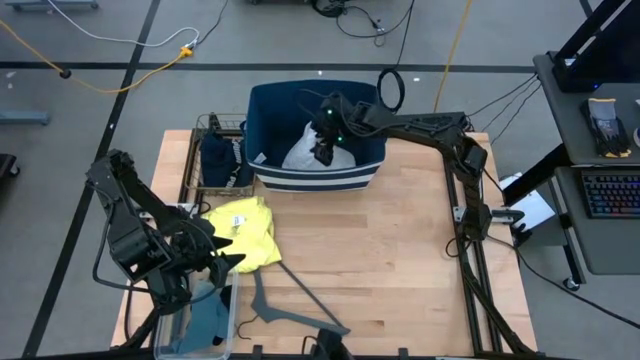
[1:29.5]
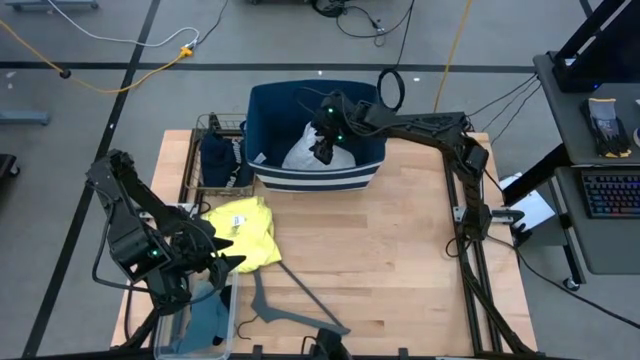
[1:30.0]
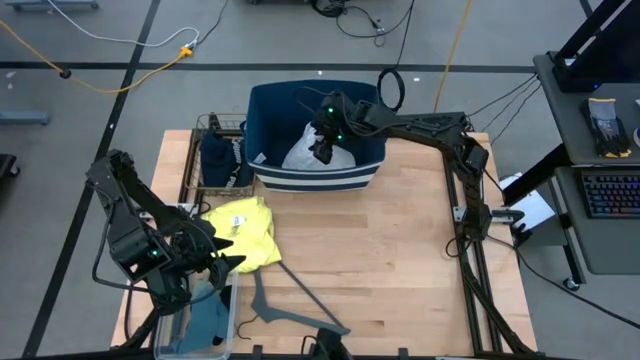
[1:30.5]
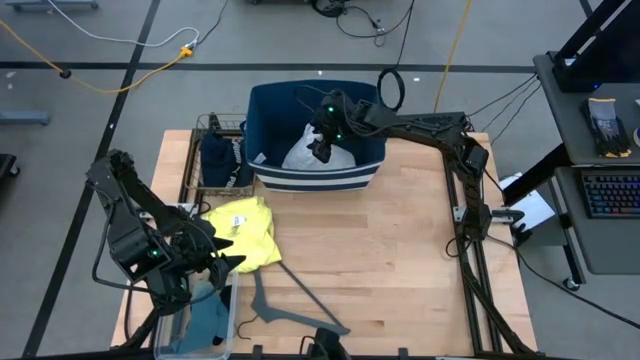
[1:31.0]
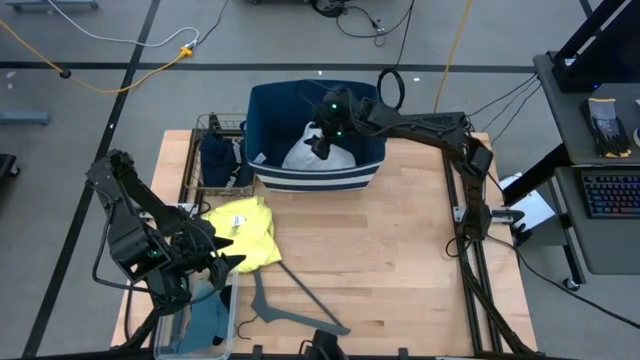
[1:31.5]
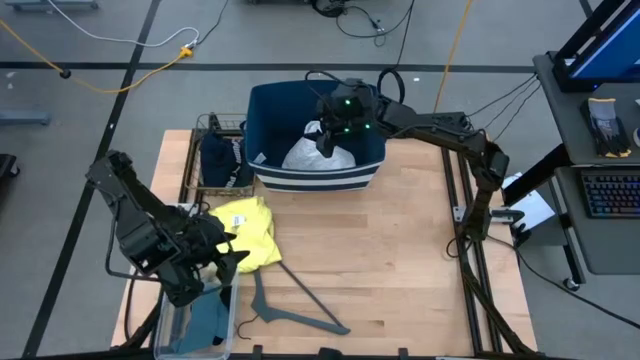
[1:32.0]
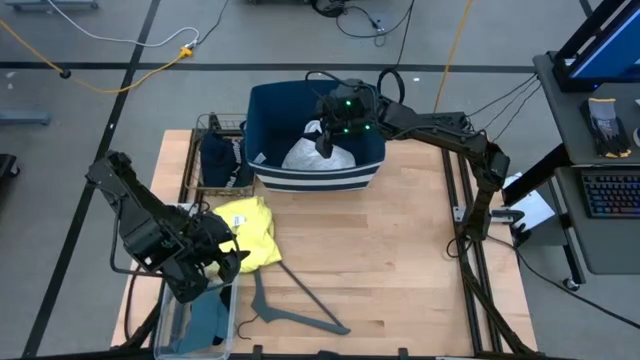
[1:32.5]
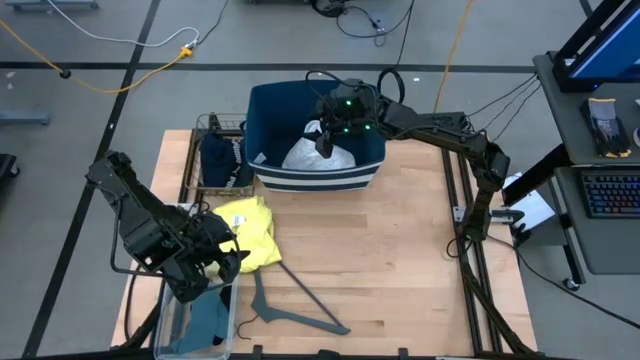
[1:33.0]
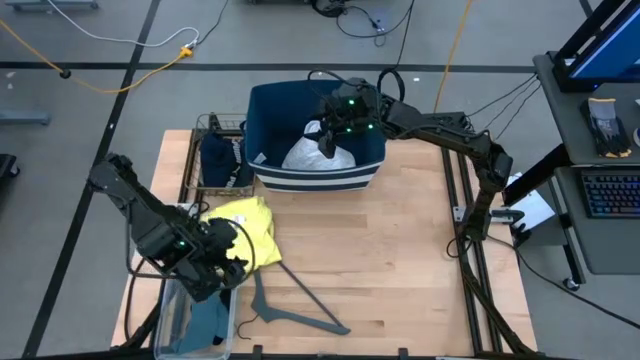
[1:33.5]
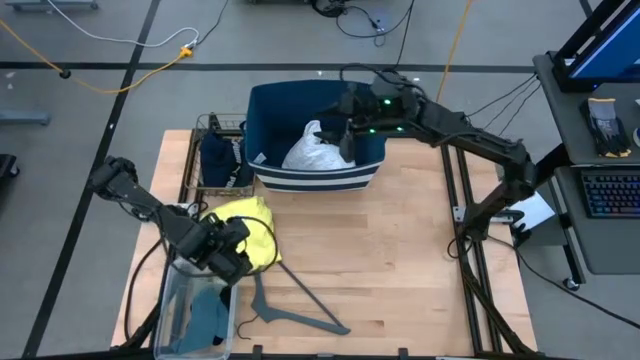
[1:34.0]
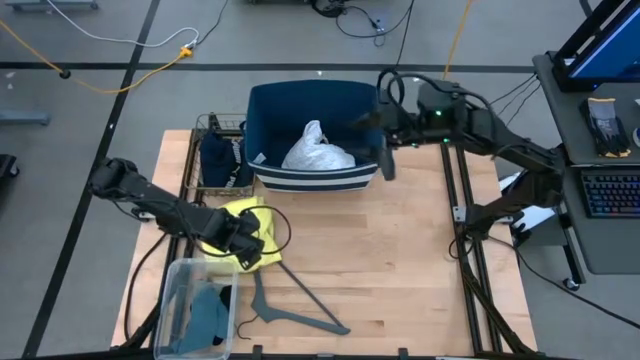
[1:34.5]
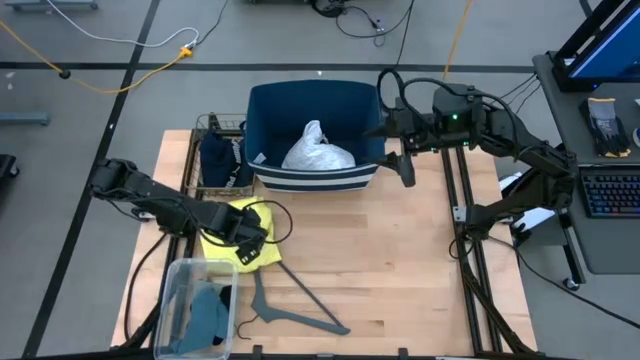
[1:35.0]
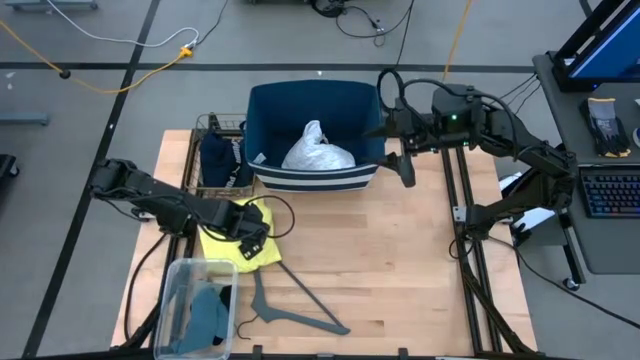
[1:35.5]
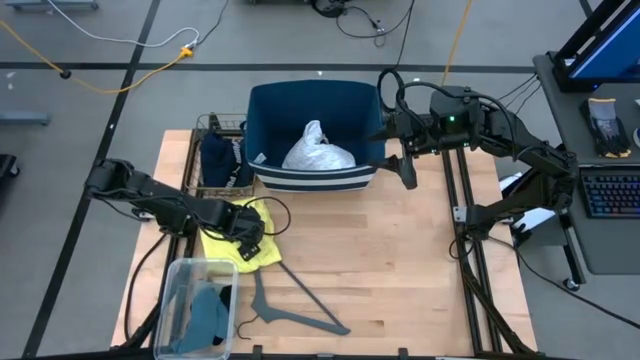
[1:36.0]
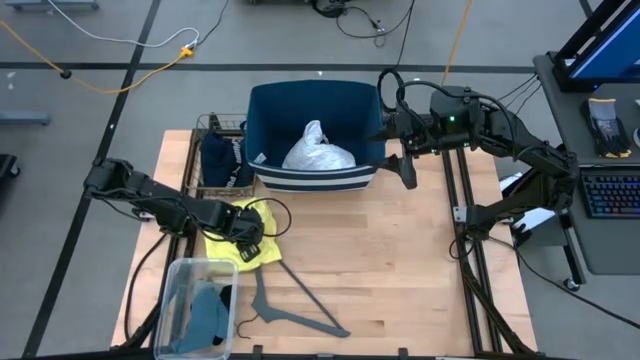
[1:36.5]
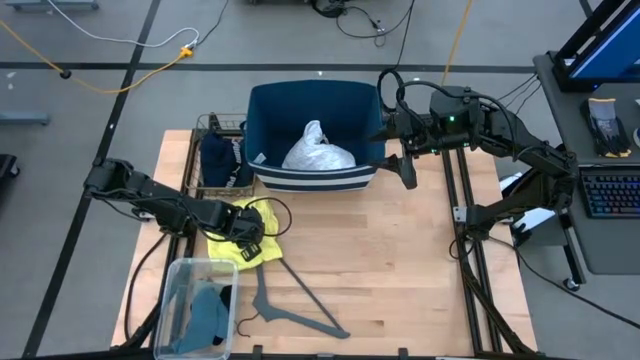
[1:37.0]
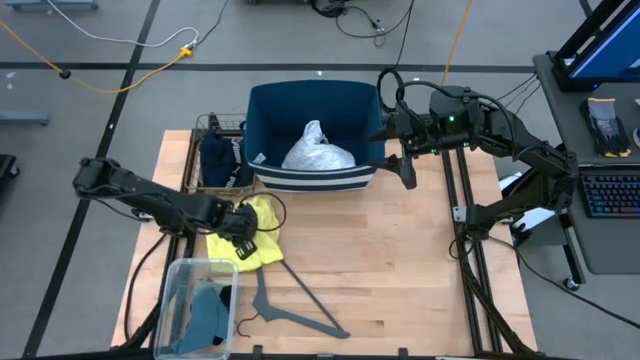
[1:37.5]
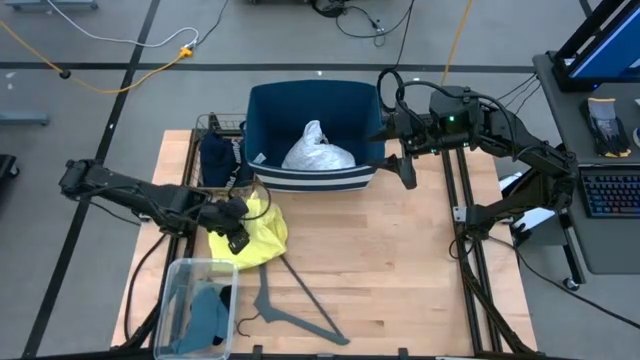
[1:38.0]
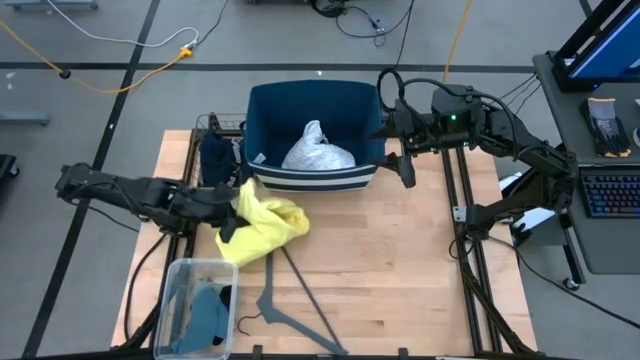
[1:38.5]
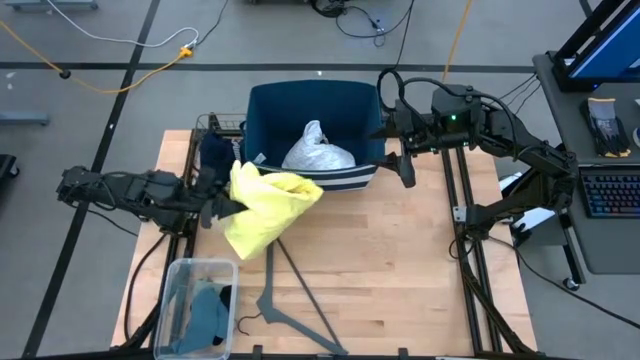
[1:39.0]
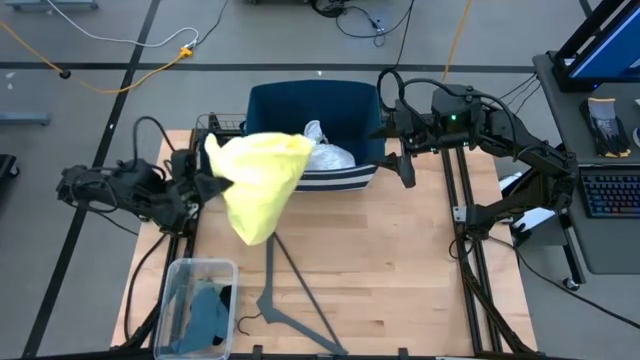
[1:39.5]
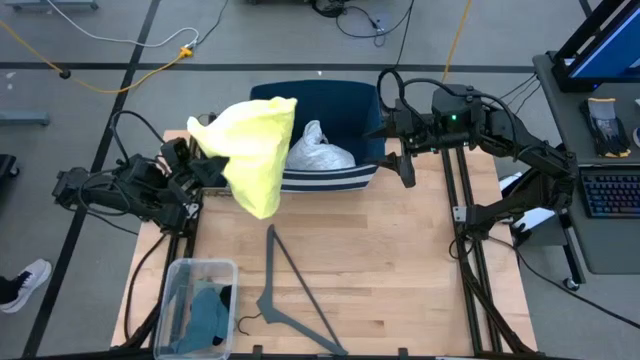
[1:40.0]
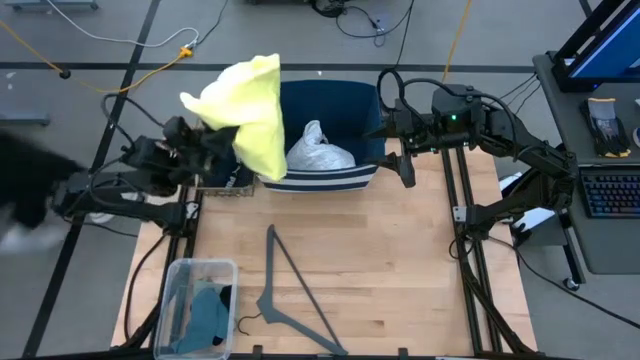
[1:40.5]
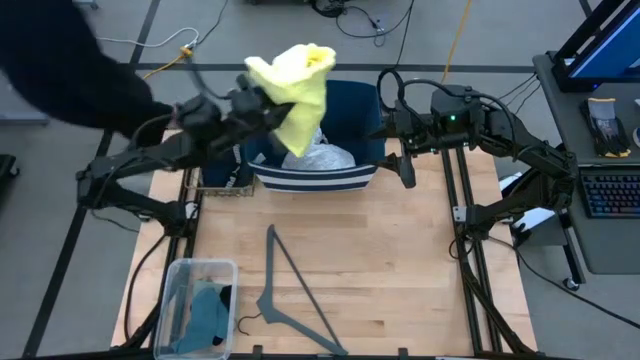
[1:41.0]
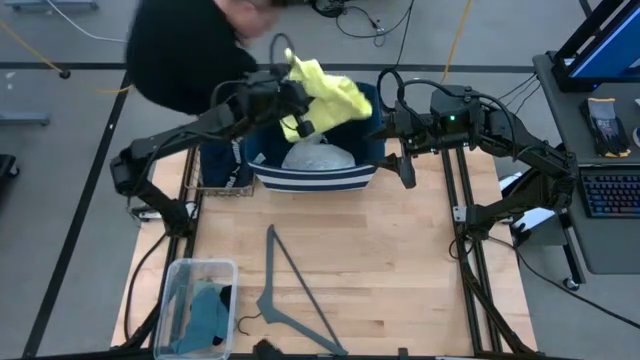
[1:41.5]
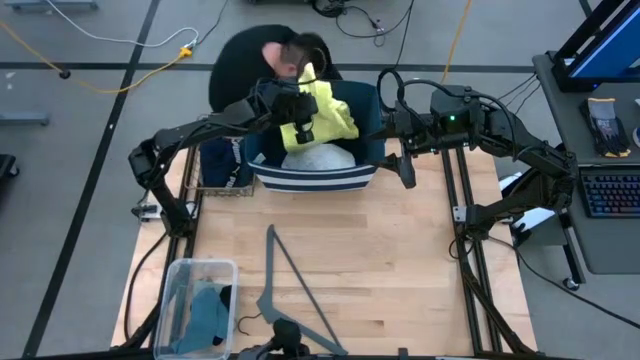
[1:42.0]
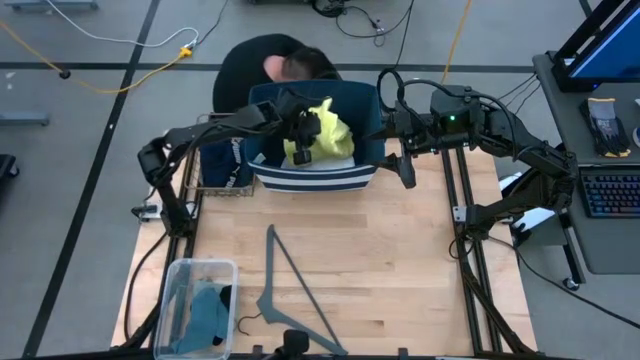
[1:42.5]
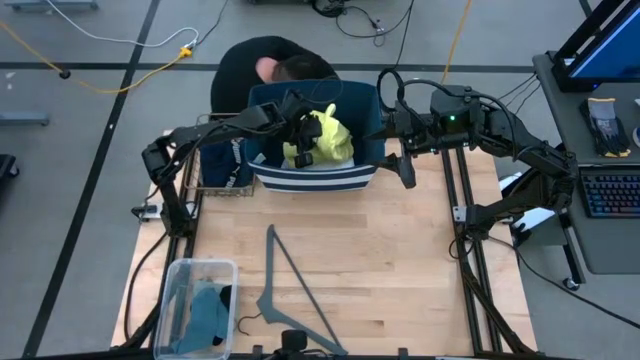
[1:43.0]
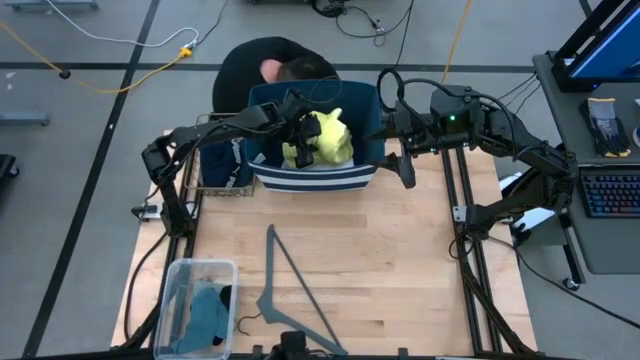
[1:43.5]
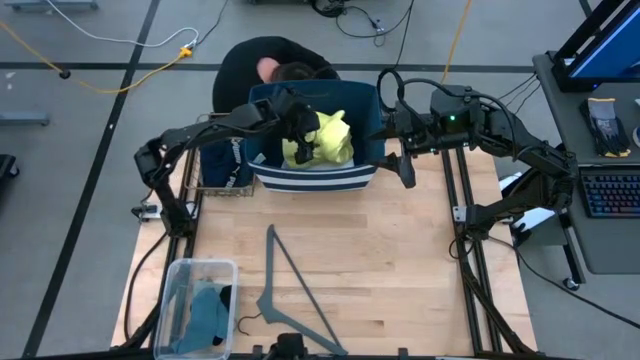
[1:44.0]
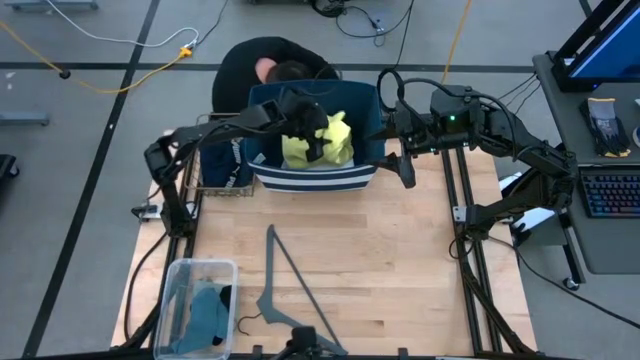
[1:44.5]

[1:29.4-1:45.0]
Task: Pick & Place Cloths
Put the yellow shirt into the blue laundry bin

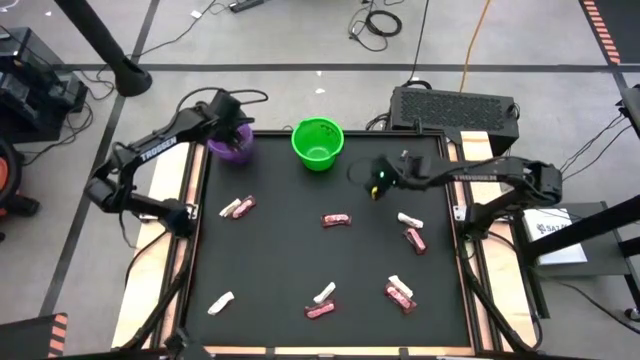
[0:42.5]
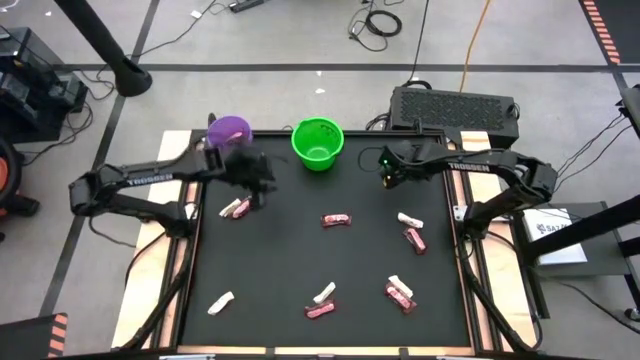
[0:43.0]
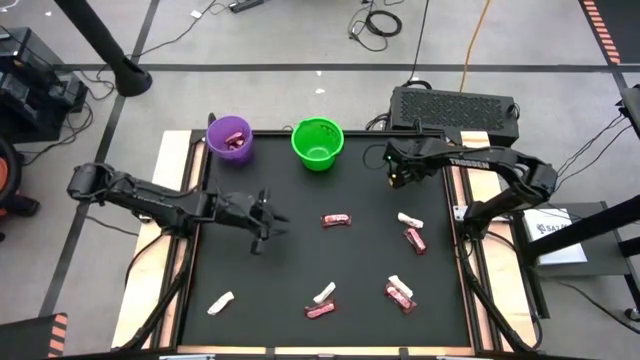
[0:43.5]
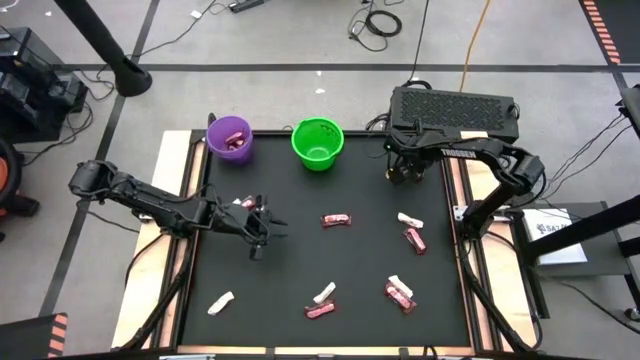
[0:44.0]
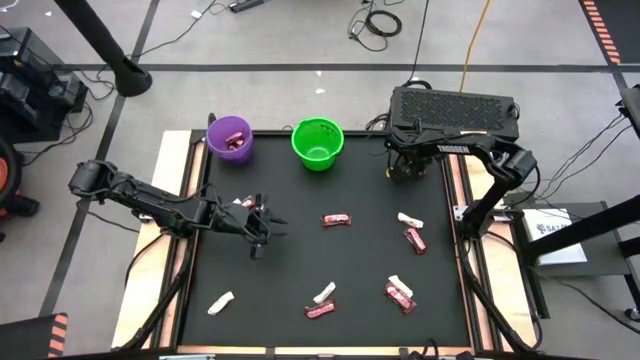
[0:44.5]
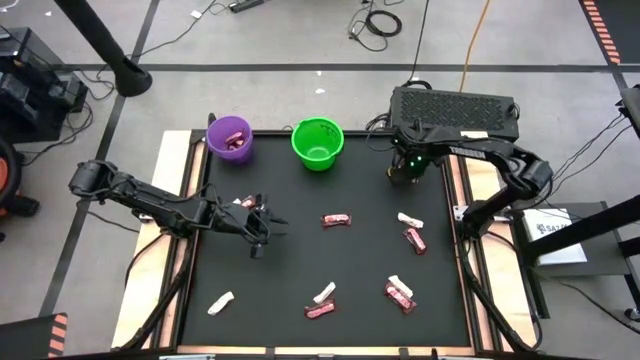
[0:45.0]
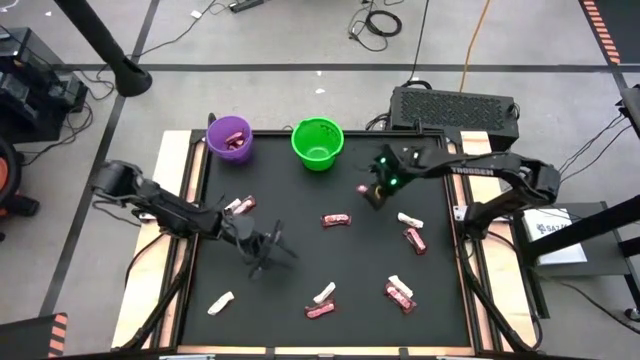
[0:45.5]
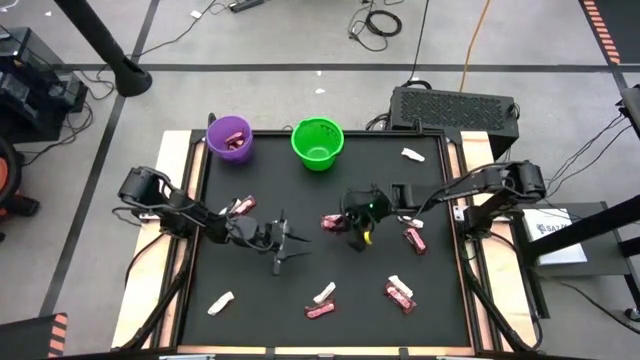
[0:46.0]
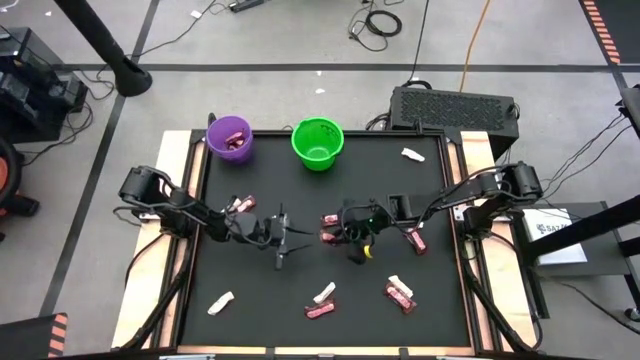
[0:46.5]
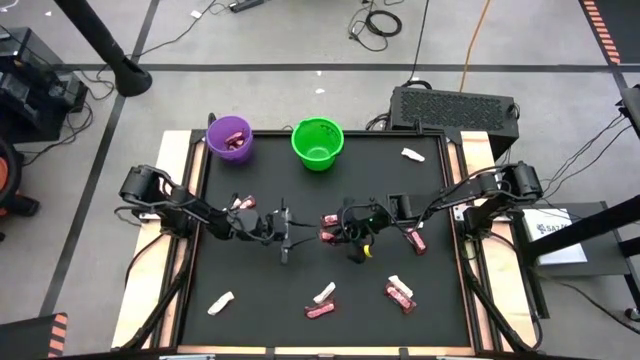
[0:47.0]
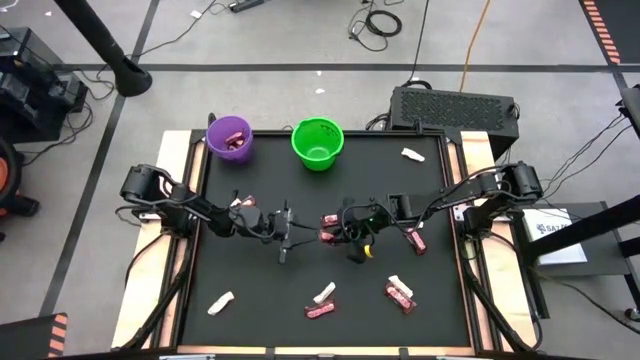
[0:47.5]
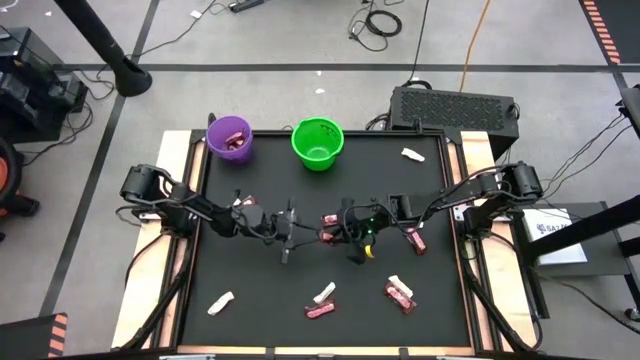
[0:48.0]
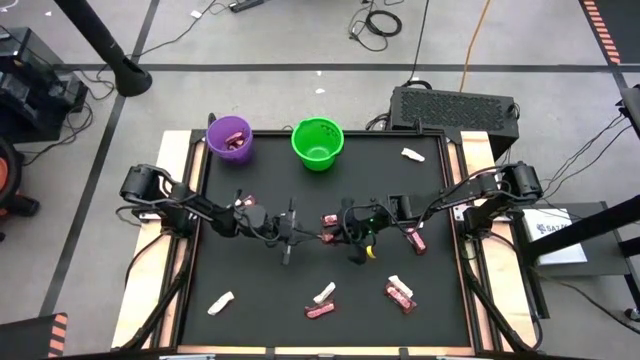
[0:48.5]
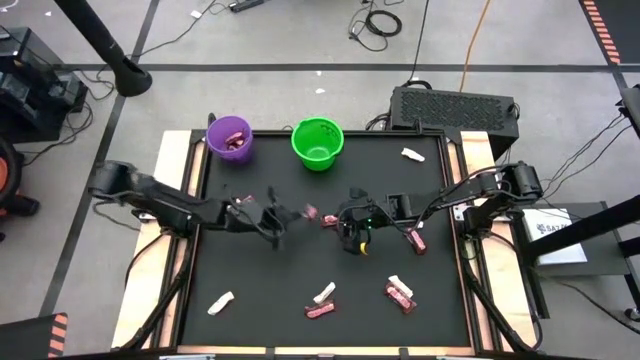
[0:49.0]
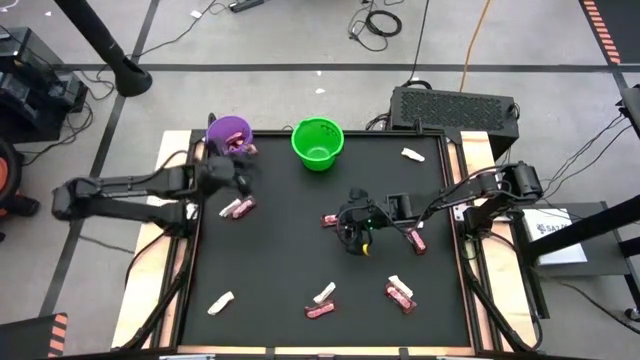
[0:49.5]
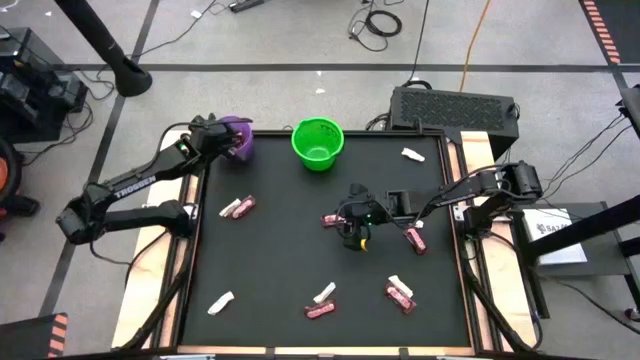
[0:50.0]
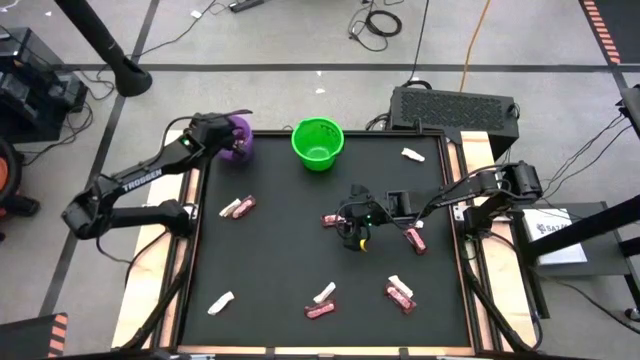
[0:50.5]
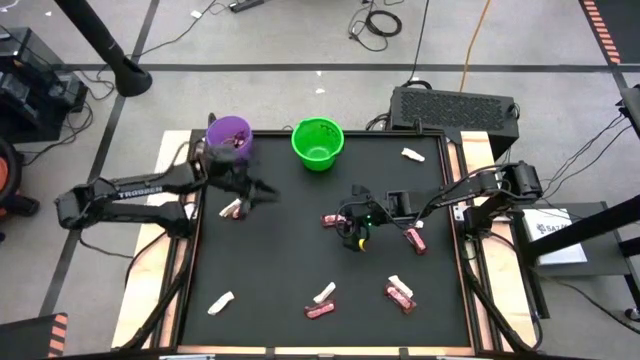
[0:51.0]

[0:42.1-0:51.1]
Task: Sort candy by brand, put in halloween buckets
Put the brown chocolate bar into the purple bucket
